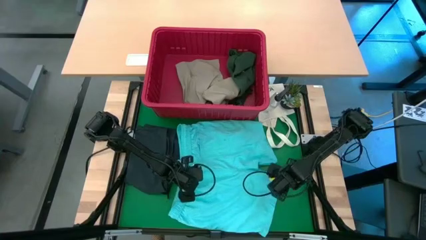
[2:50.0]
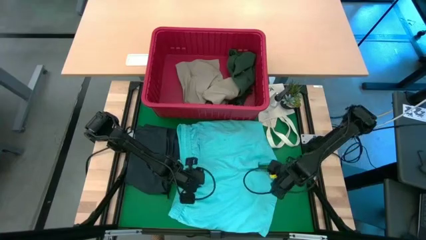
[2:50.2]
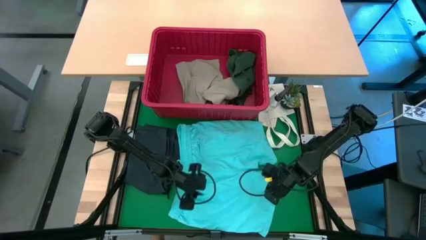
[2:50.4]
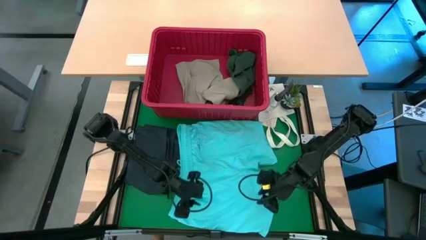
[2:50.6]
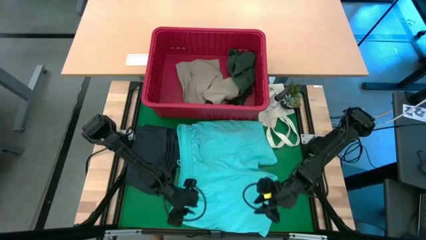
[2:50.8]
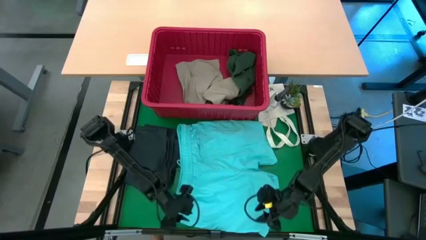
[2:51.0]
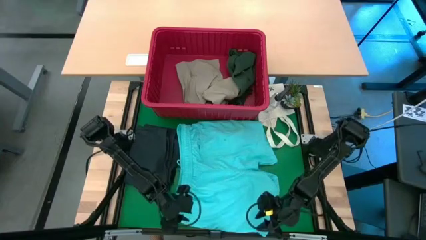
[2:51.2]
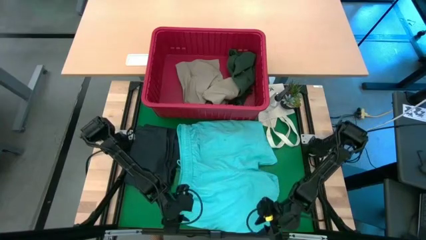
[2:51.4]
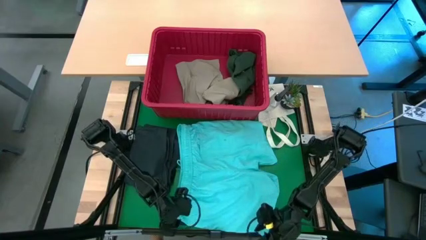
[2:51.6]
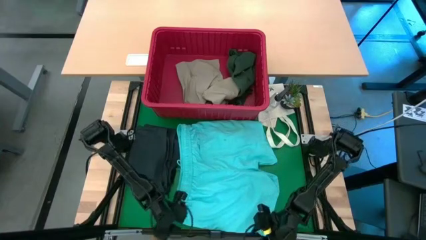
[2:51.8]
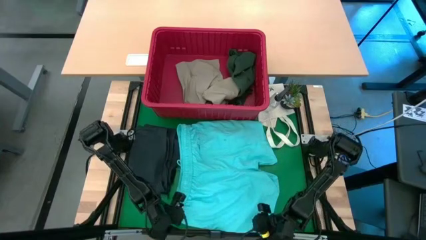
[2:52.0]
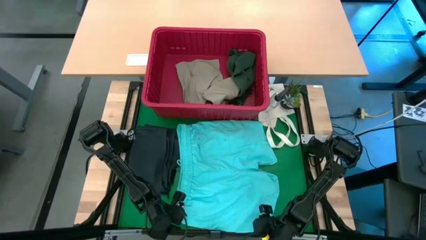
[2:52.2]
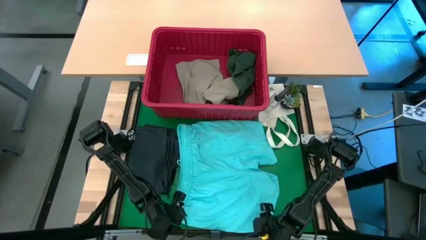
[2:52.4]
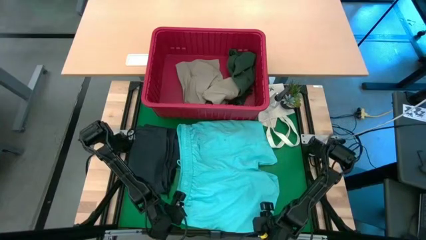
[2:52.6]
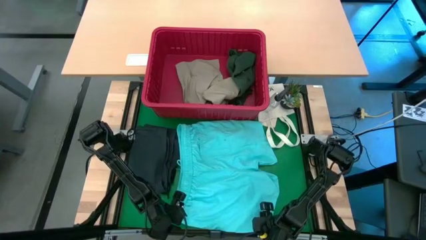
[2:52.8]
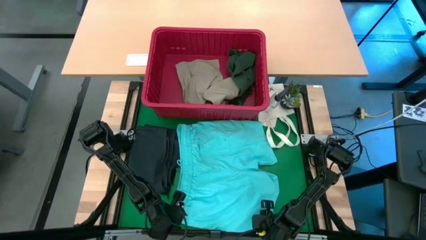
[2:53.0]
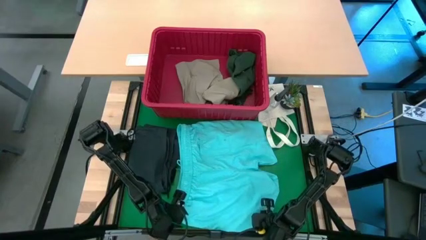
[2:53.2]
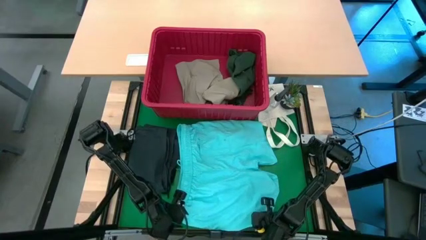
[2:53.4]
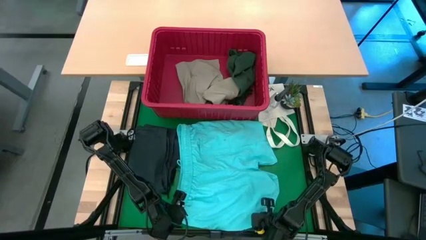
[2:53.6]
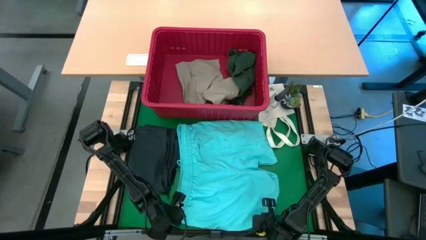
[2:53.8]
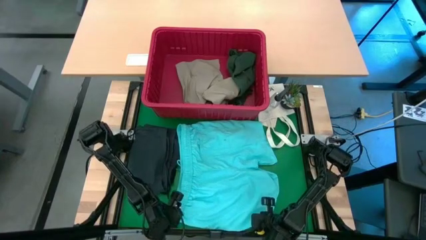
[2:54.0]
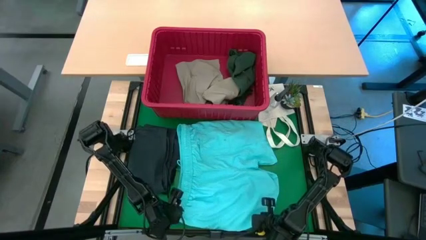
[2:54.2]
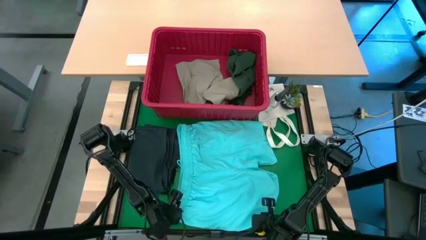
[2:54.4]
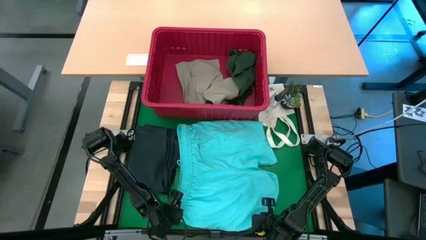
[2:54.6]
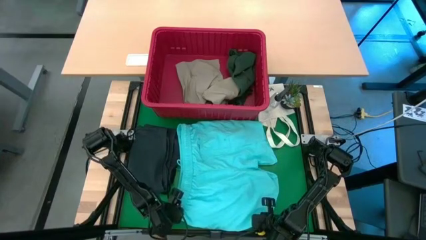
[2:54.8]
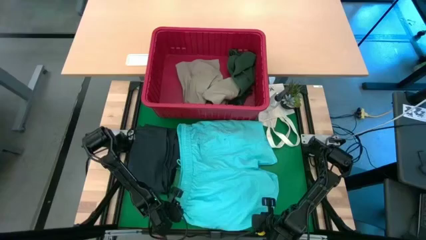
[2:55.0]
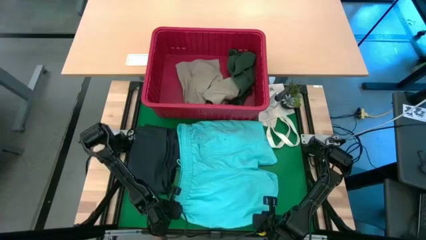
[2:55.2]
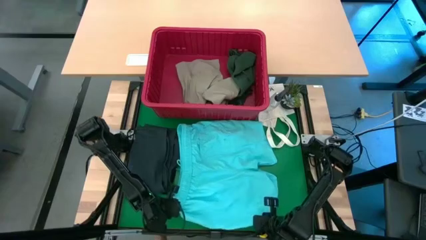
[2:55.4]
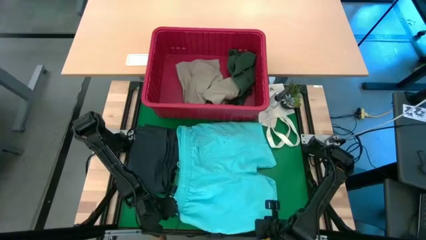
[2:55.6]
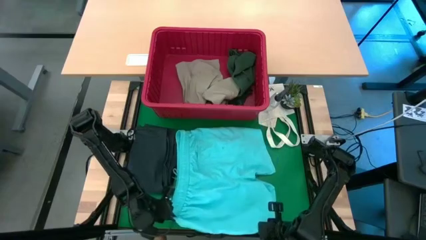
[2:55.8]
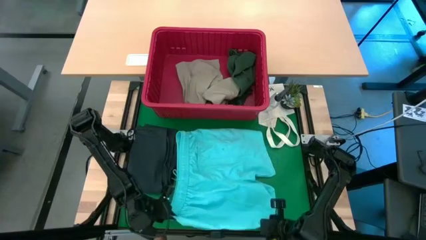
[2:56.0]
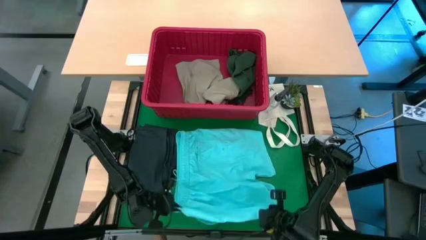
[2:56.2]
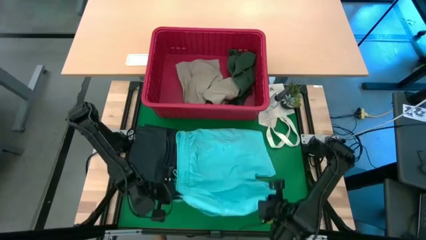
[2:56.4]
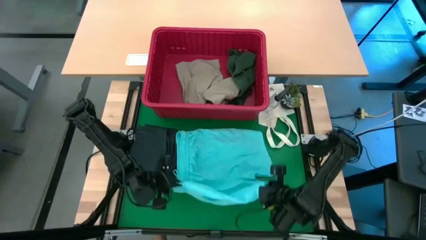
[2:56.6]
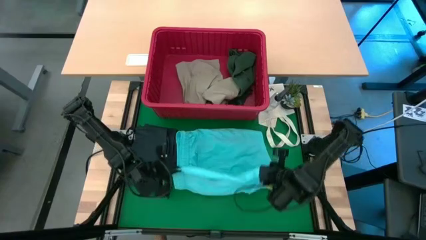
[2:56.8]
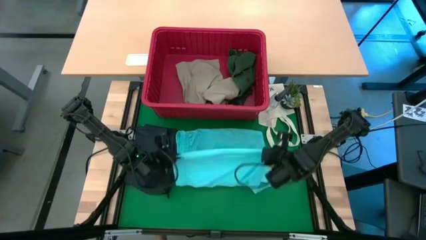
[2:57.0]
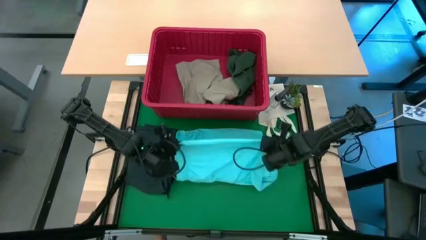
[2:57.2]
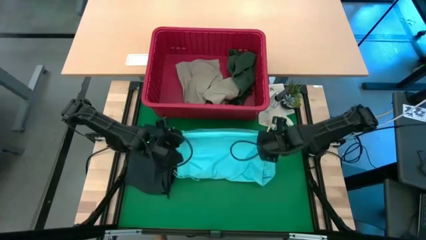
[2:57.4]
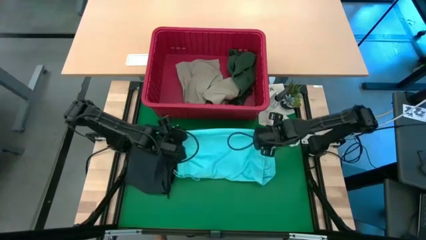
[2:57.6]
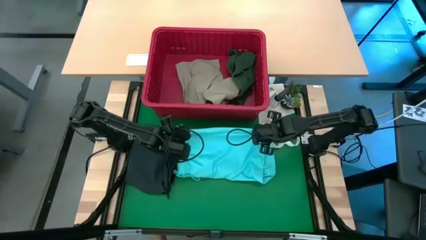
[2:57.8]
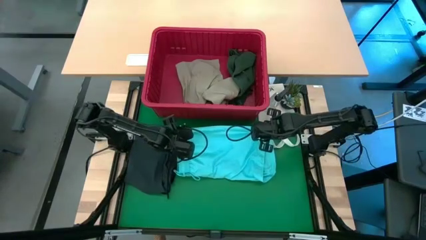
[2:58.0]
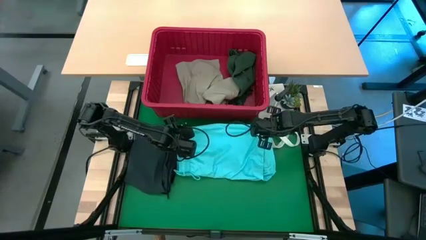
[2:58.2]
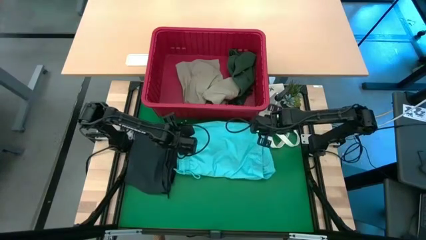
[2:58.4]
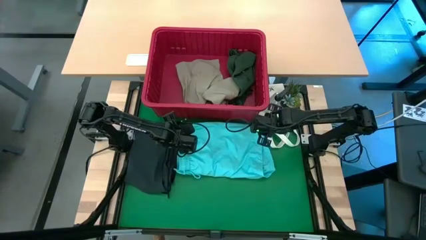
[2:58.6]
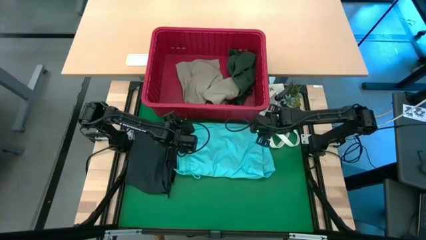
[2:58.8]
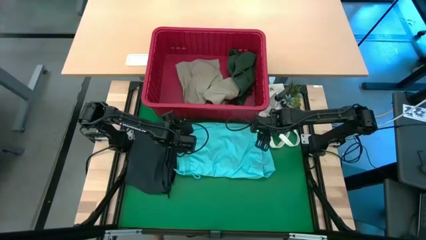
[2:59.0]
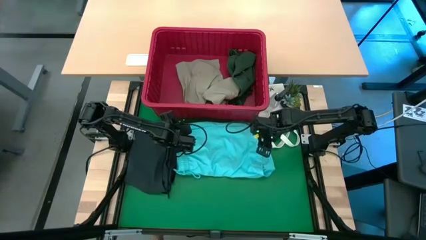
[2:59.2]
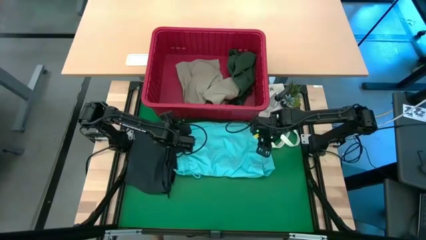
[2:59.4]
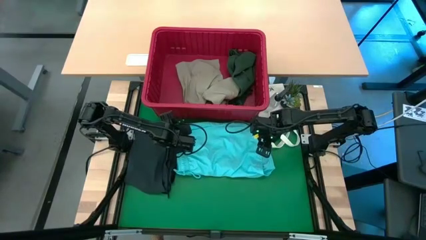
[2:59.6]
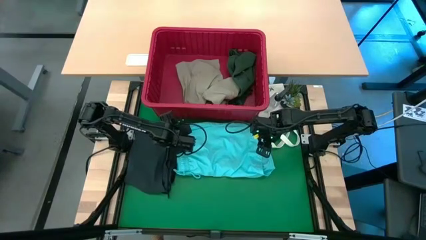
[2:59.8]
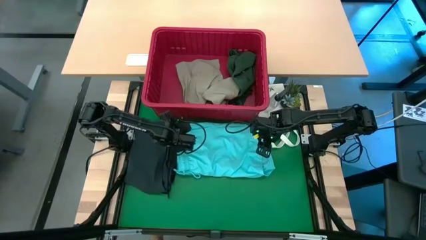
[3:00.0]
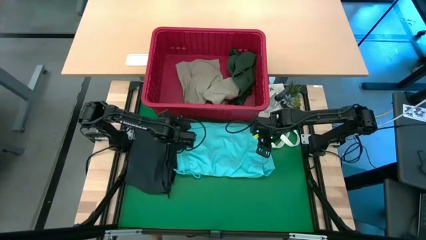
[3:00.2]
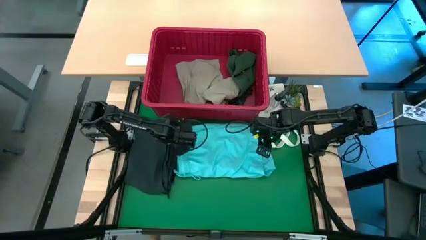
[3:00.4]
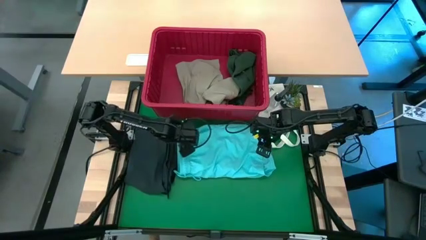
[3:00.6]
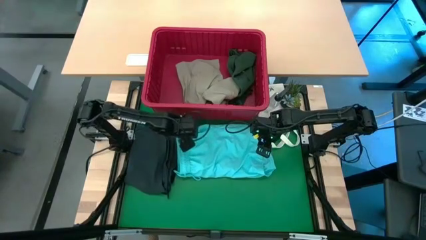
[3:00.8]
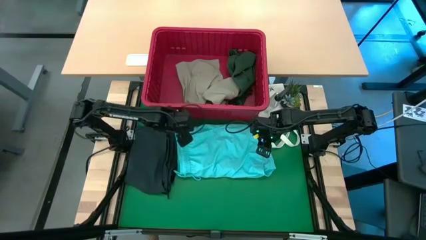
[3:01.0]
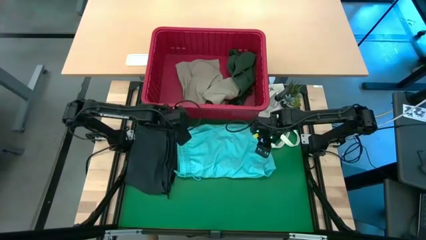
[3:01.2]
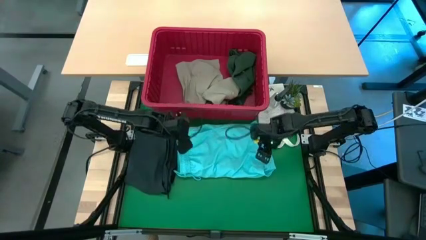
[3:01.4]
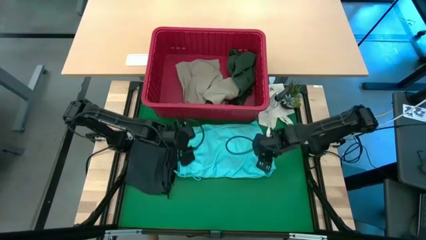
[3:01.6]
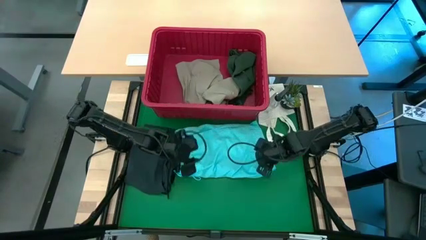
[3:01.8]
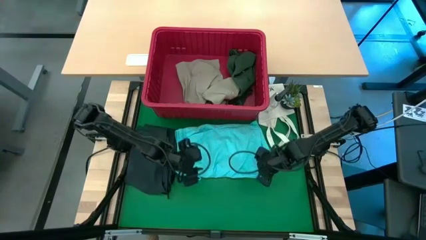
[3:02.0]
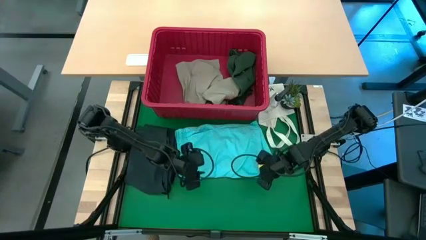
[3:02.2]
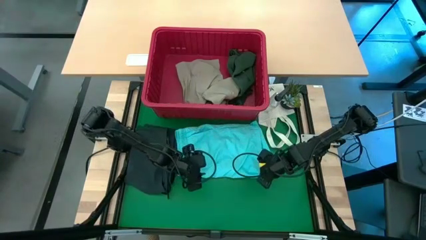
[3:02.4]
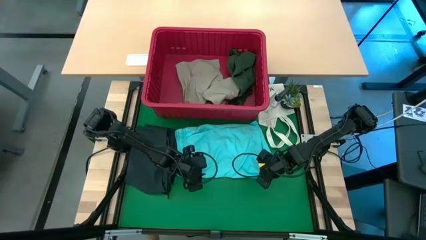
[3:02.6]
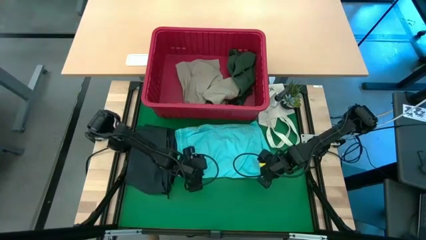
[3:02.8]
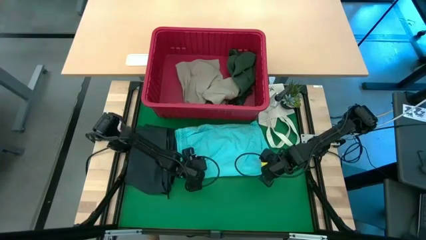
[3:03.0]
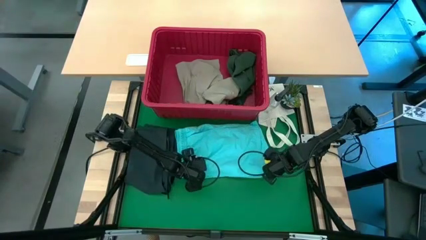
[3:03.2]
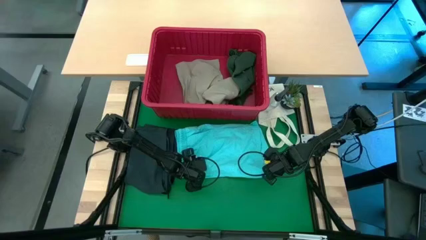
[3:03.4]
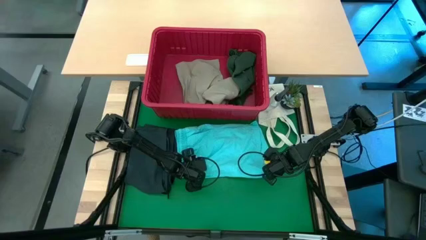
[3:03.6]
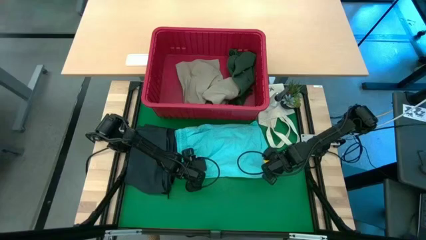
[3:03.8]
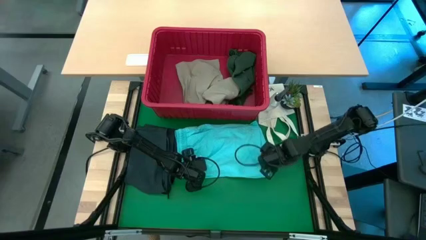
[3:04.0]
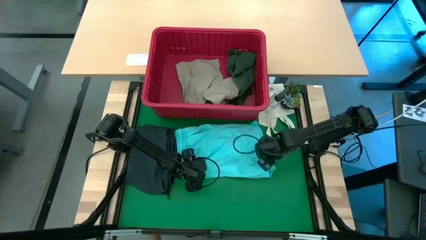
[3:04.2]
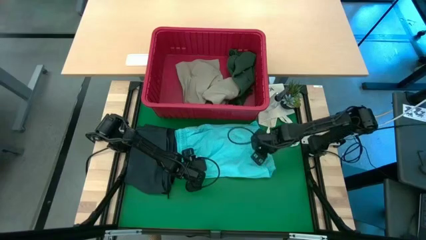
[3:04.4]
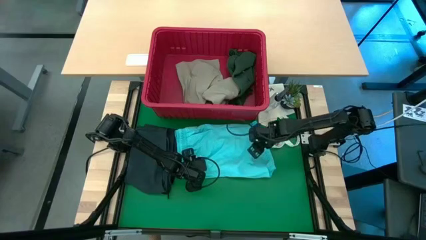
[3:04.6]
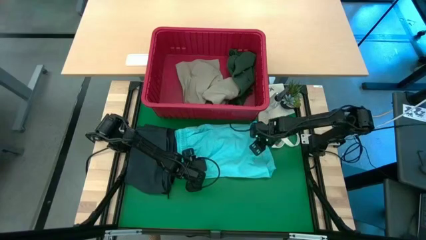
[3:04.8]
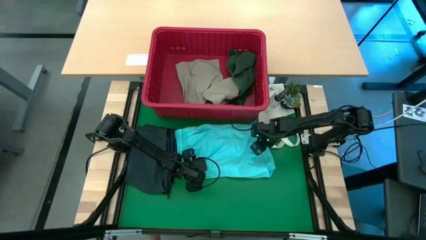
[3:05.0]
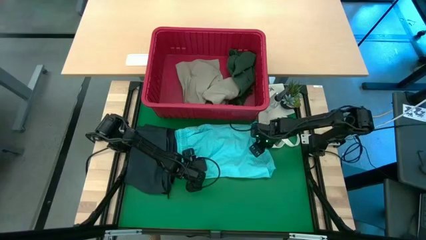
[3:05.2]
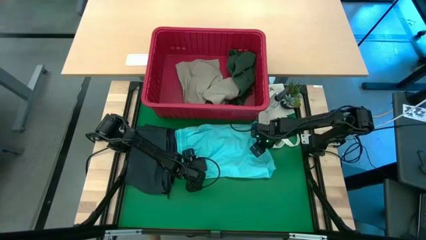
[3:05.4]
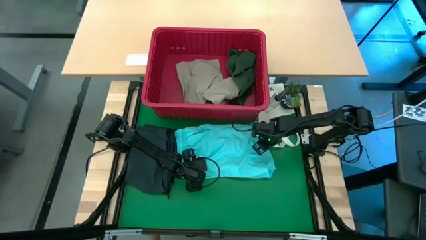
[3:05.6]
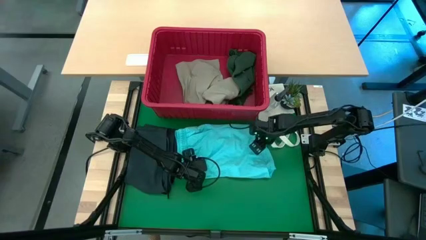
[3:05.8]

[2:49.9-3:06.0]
Task: Fold Laundry from Bin
Fold the blue shorts from the red laundry bin
